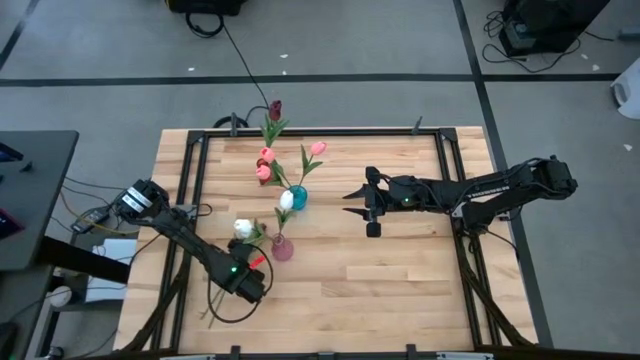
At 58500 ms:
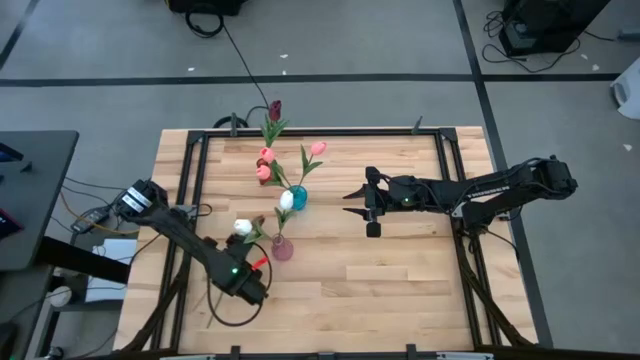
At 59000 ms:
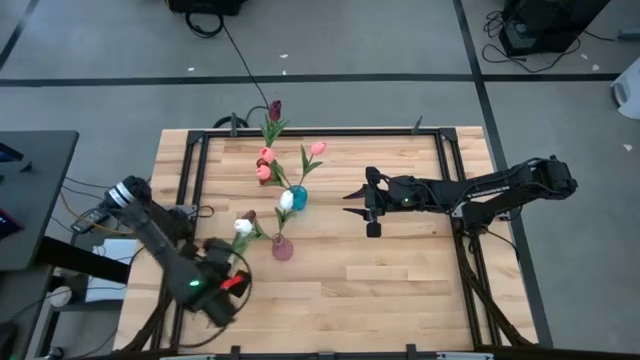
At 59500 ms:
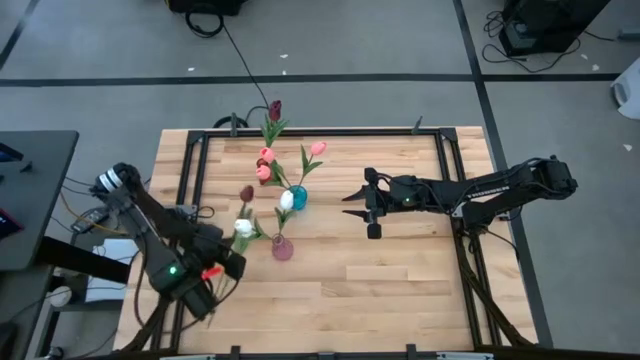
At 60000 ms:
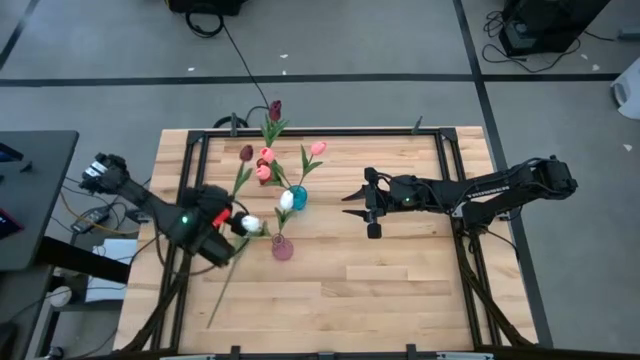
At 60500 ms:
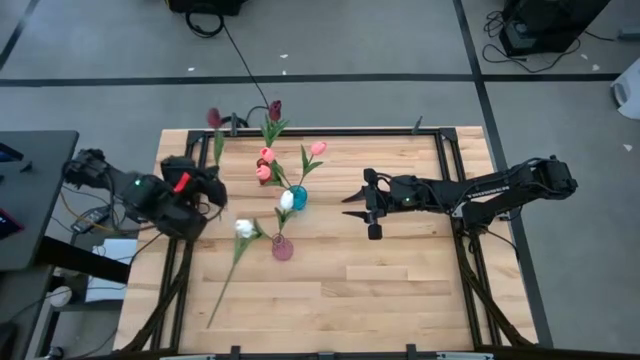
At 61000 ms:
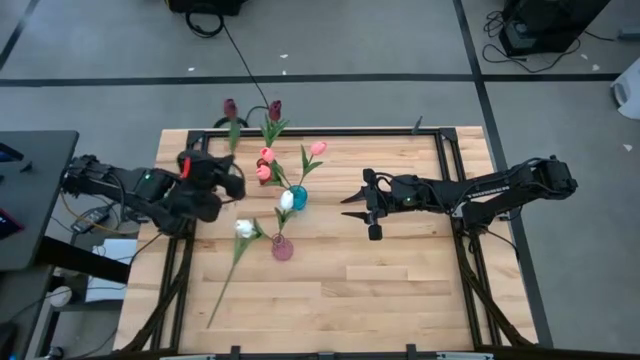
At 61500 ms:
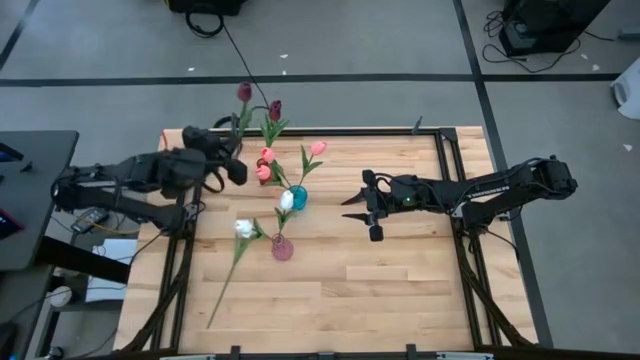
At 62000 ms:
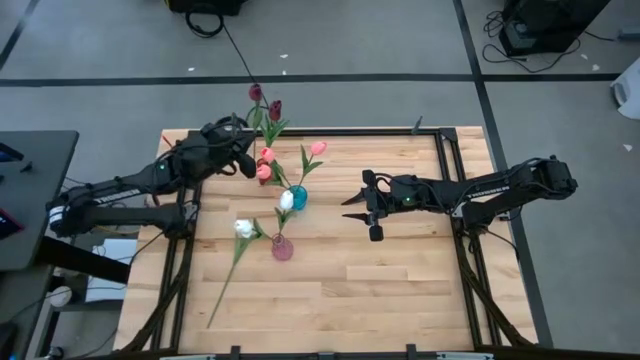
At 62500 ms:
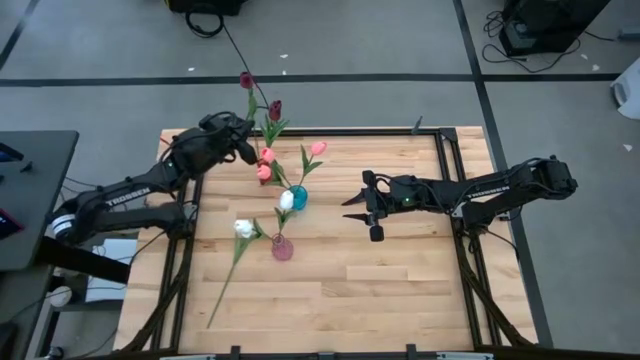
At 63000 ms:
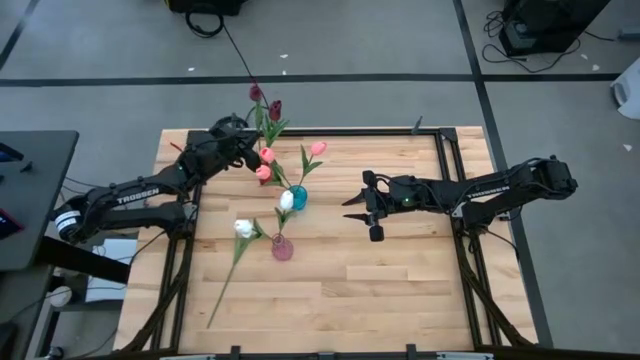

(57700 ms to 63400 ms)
Task: Sort flowers into vase by color
Put the red tulip into the red vase

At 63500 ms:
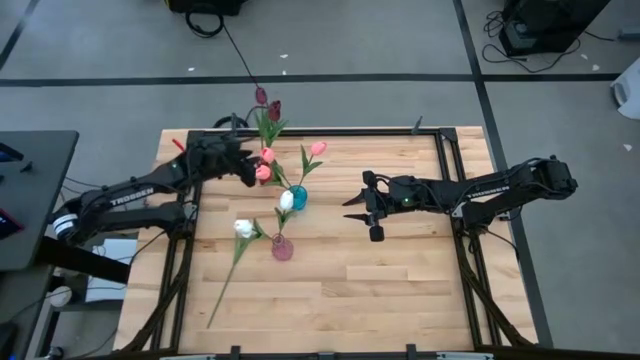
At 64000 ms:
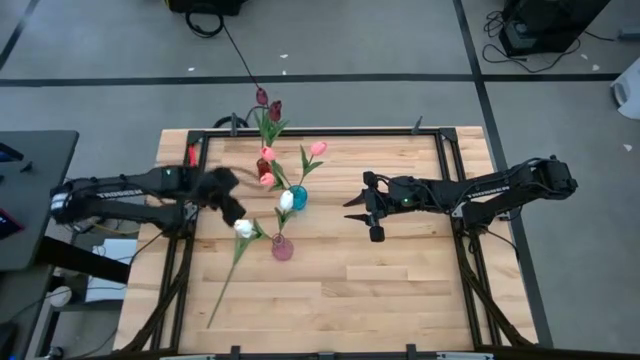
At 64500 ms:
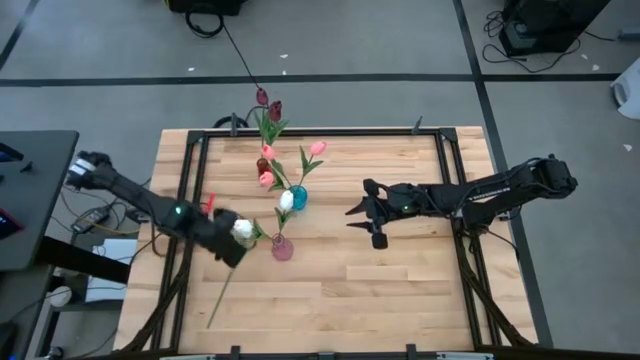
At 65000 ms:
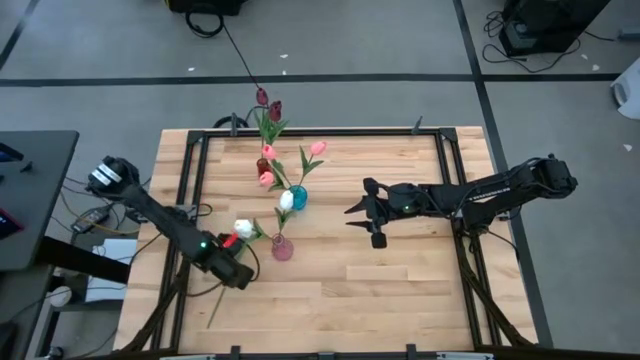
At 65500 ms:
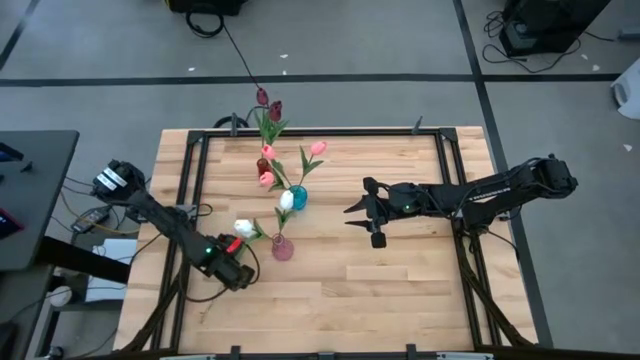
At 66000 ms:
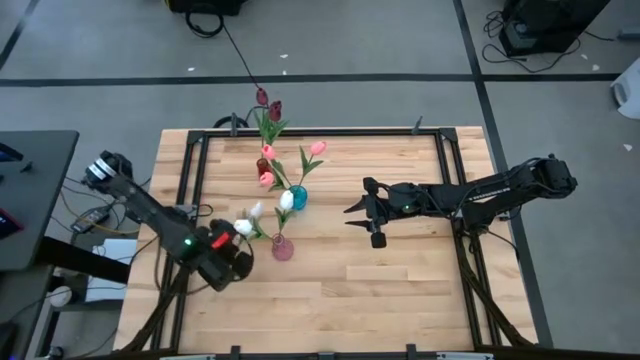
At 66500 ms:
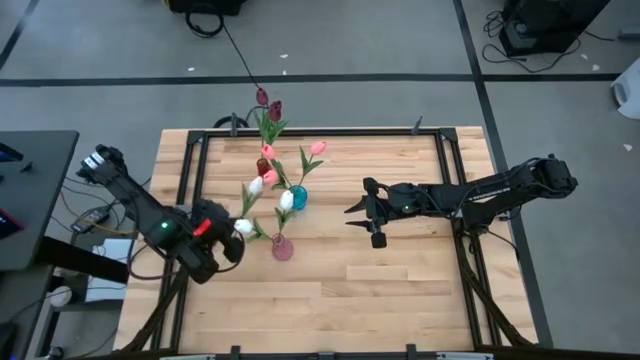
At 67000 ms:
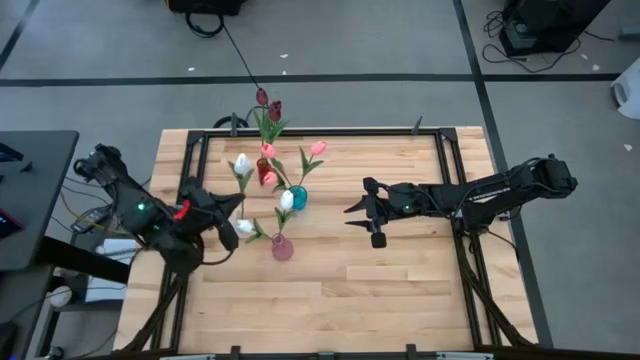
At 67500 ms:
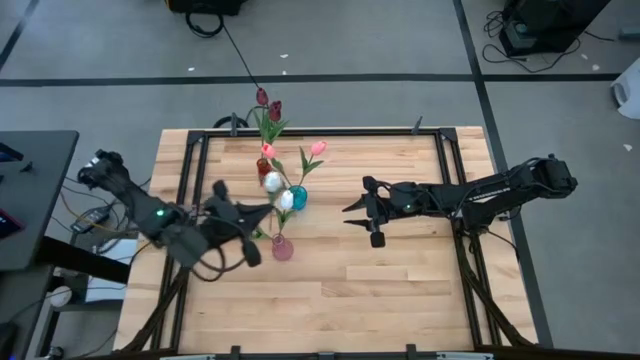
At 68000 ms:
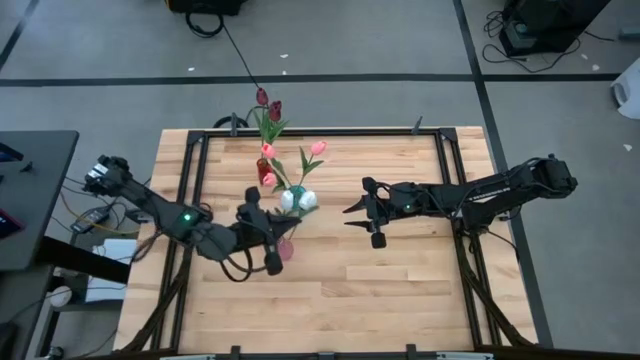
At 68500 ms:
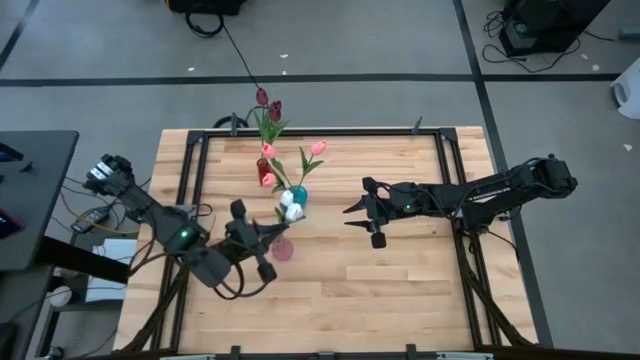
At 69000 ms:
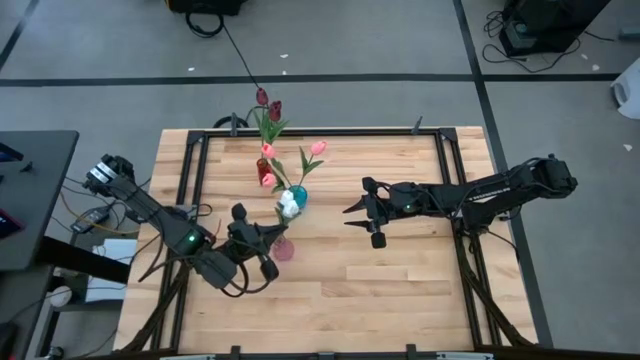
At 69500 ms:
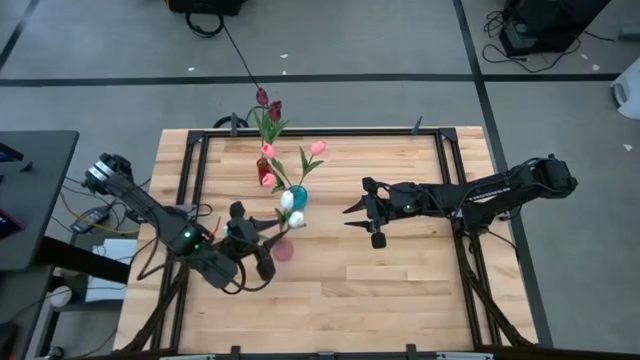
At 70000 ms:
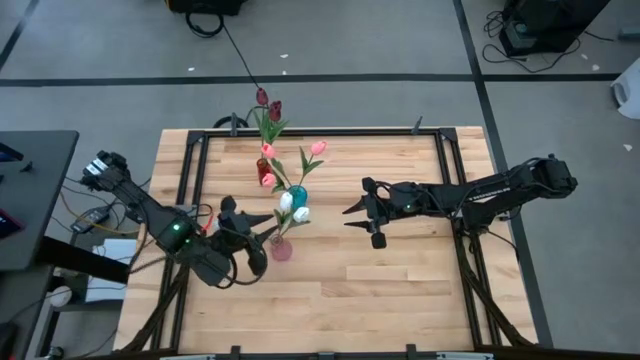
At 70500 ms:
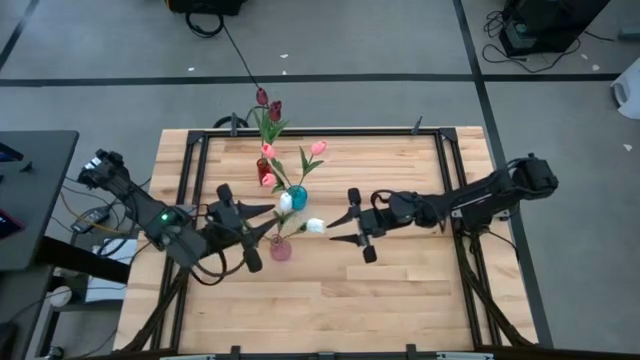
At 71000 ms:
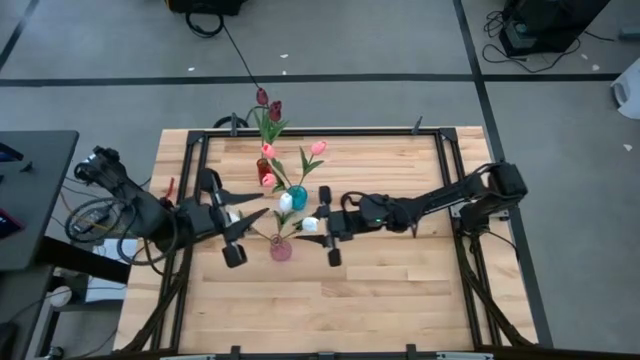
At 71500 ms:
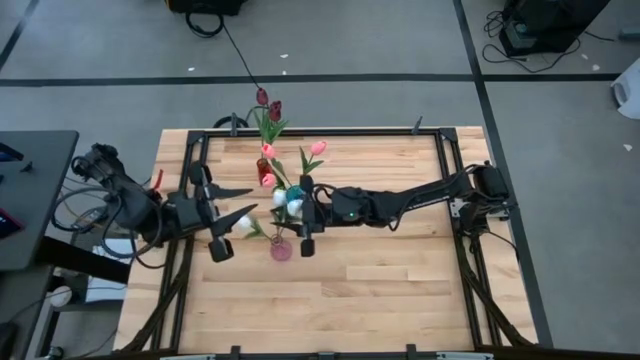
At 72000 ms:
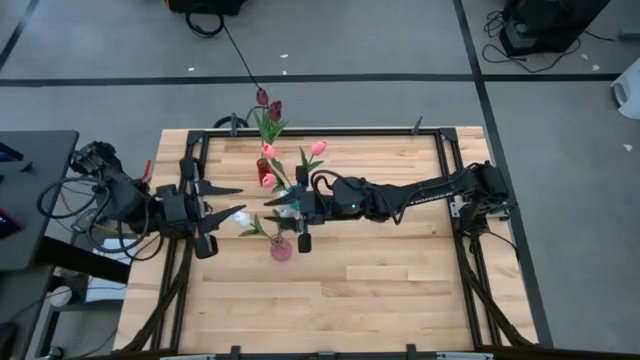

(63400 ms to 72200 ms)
Put the white tulip into the pink vase

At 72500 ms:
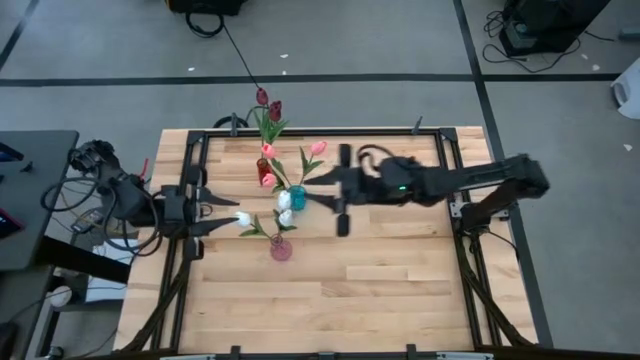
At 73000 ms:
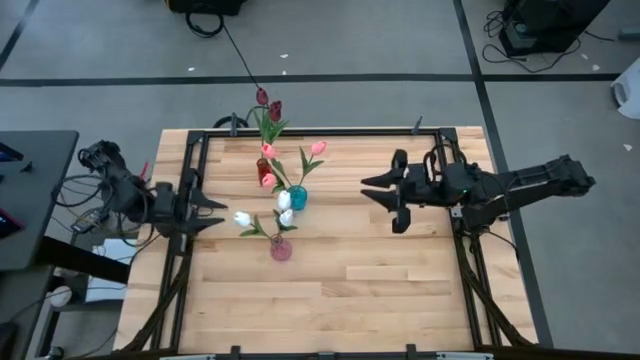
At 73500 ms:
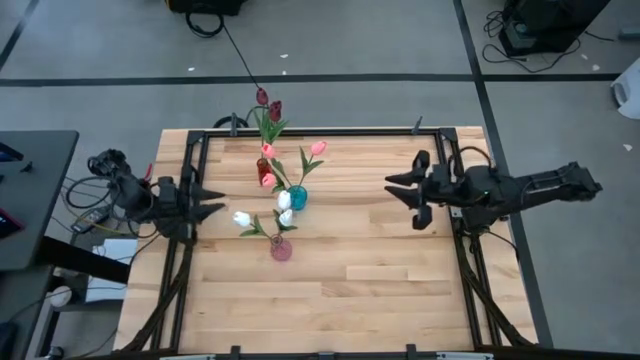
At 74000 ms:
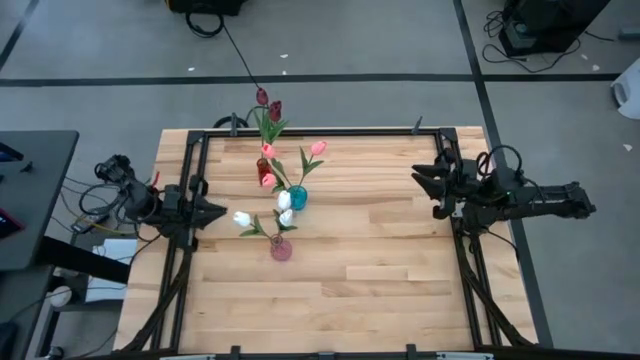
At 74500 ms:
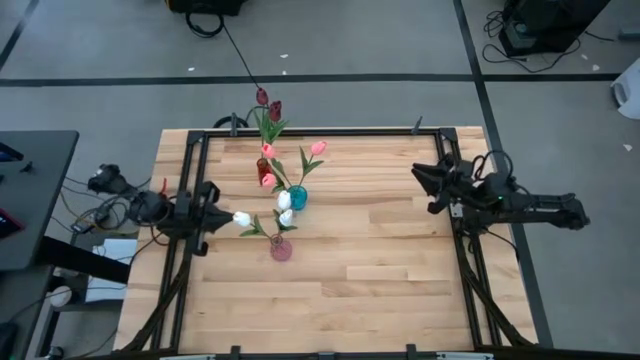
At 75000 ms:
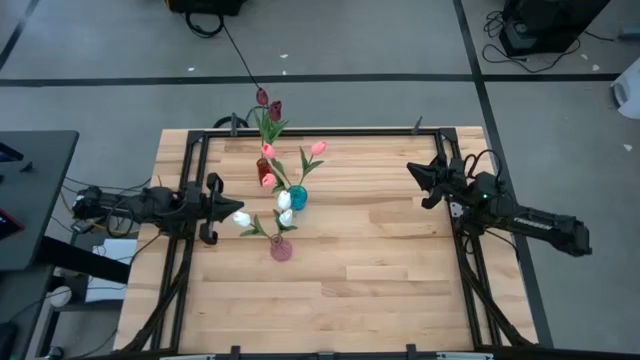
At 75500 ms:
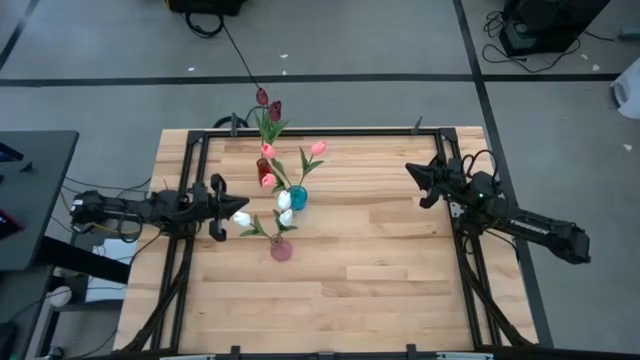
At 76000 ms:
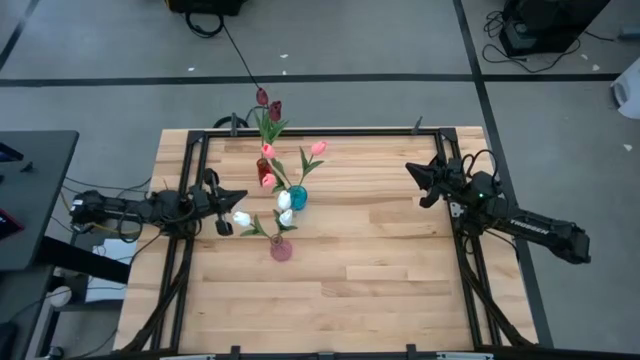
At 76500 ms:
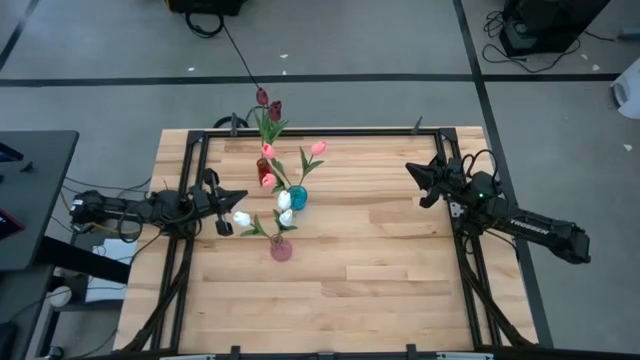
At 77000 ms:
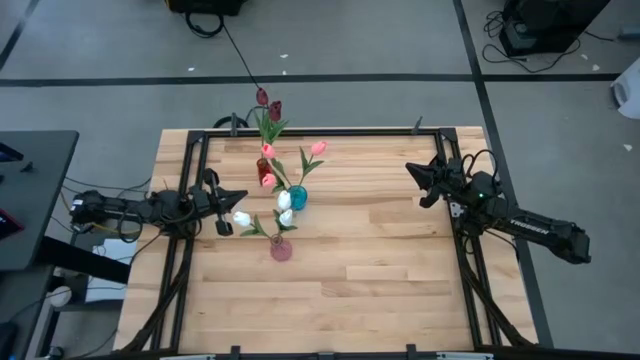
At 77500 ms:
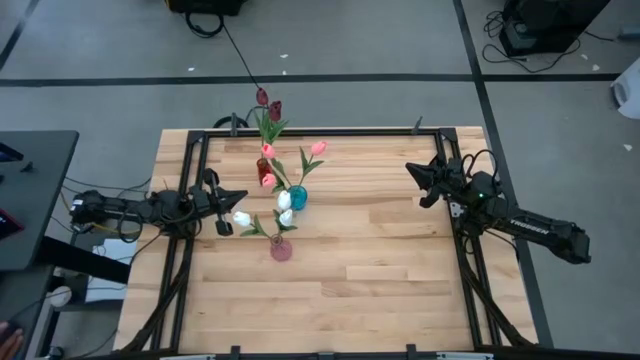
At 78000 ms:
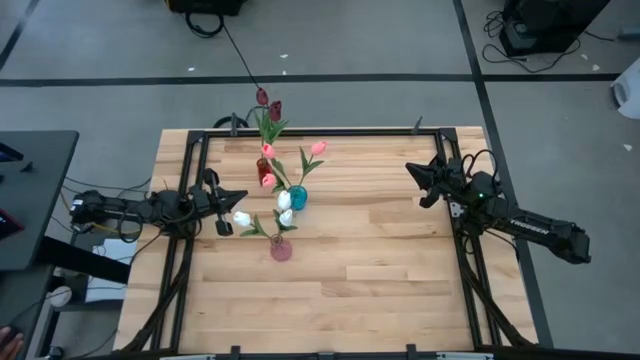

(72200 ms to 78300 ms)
Return to Home Position
